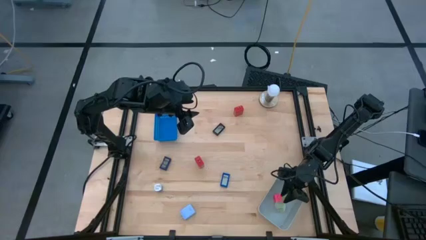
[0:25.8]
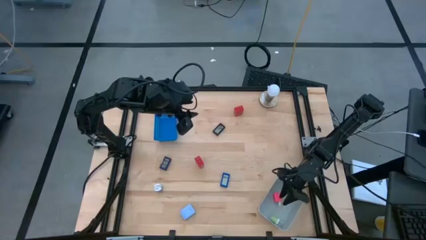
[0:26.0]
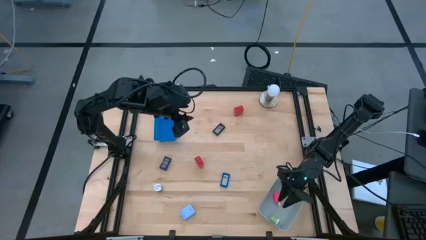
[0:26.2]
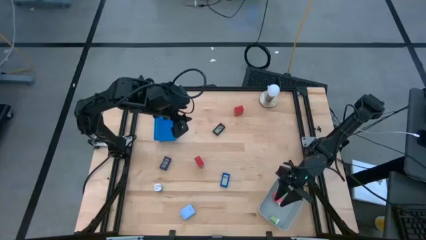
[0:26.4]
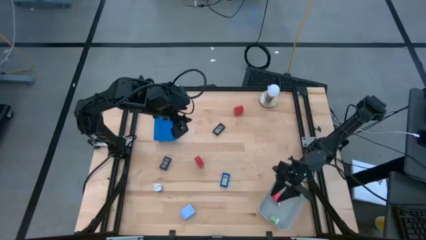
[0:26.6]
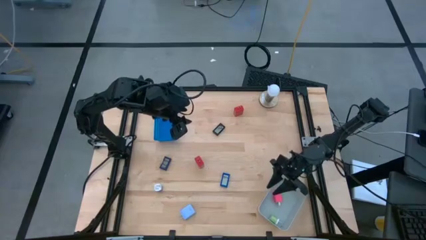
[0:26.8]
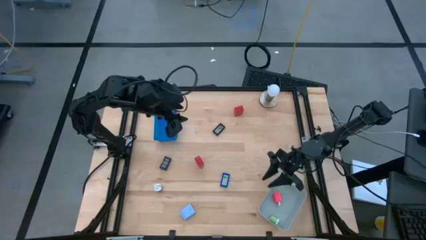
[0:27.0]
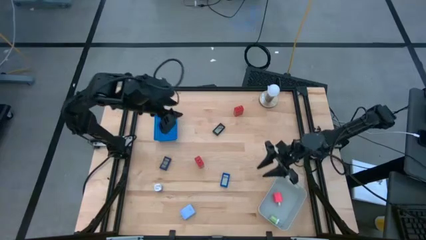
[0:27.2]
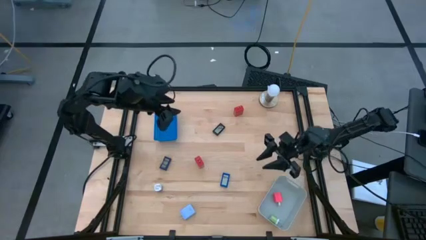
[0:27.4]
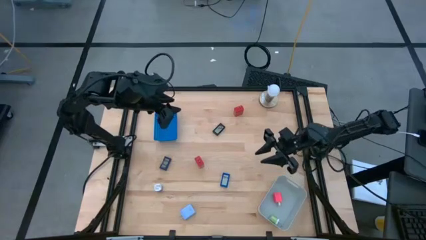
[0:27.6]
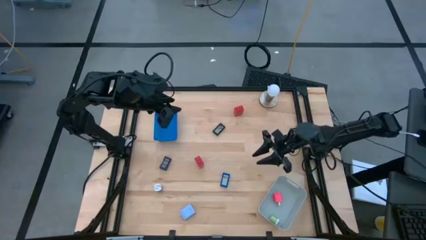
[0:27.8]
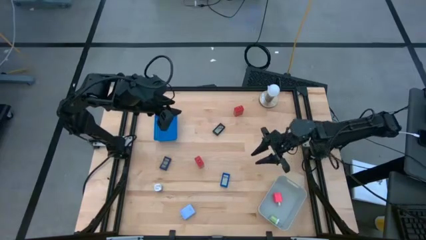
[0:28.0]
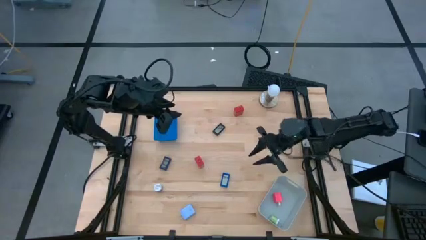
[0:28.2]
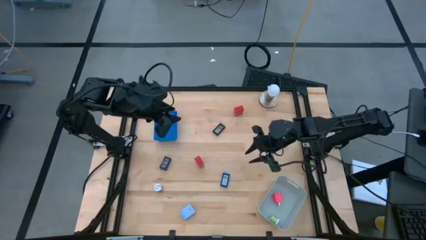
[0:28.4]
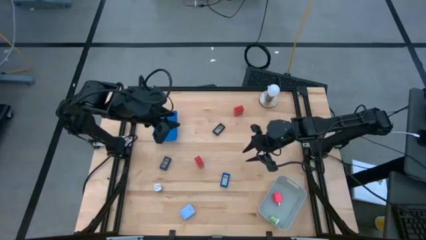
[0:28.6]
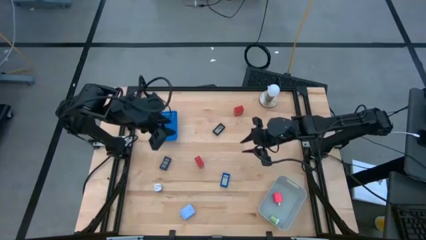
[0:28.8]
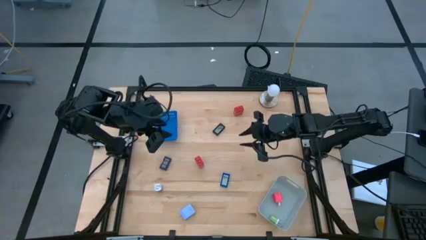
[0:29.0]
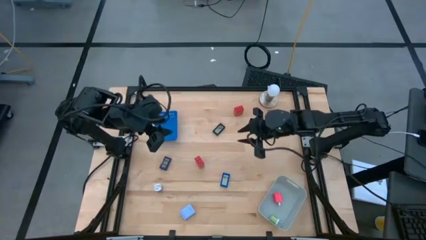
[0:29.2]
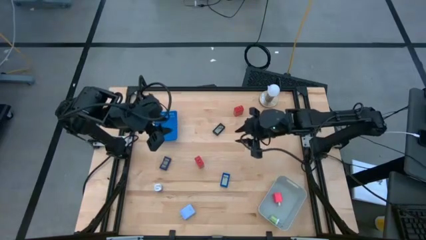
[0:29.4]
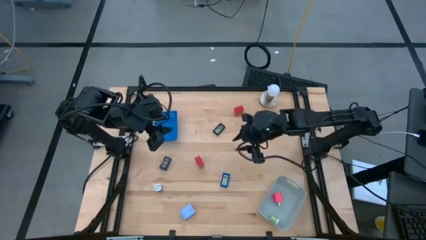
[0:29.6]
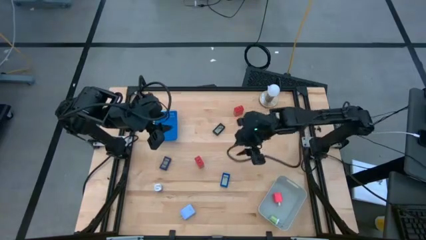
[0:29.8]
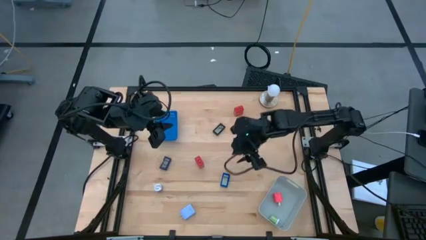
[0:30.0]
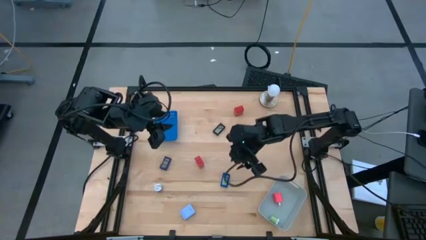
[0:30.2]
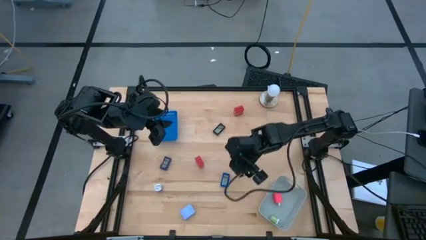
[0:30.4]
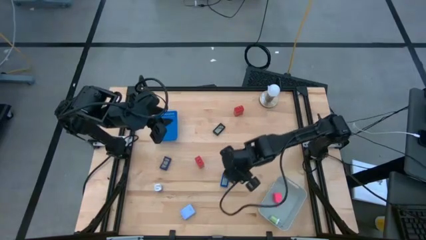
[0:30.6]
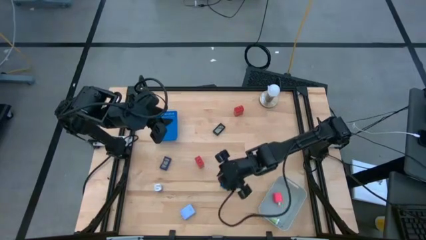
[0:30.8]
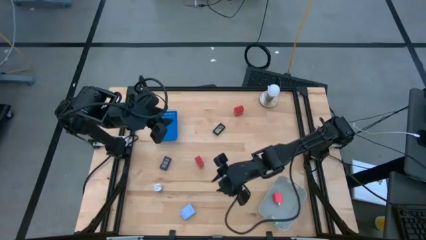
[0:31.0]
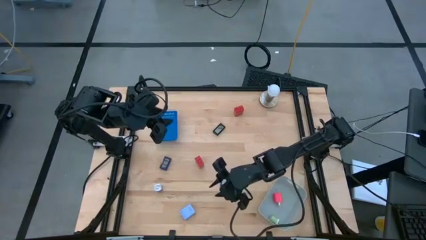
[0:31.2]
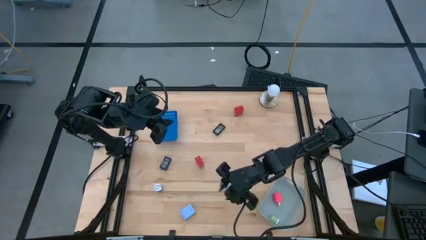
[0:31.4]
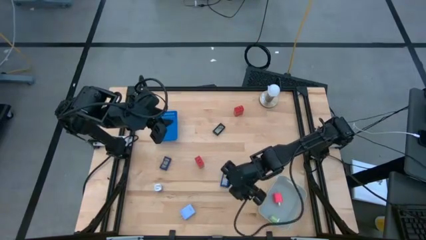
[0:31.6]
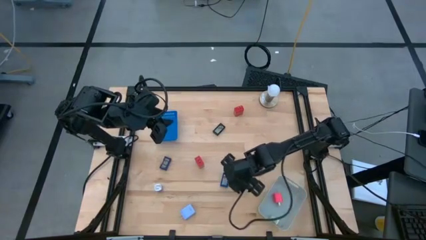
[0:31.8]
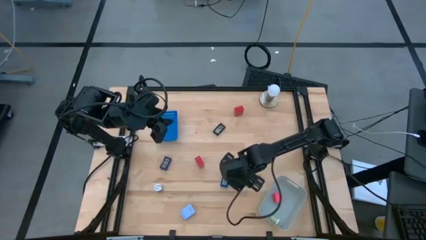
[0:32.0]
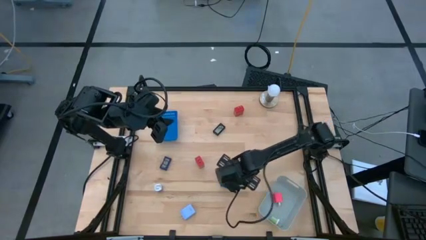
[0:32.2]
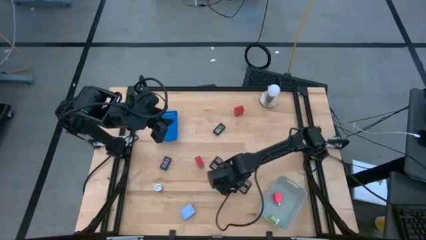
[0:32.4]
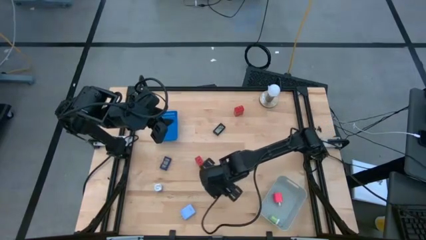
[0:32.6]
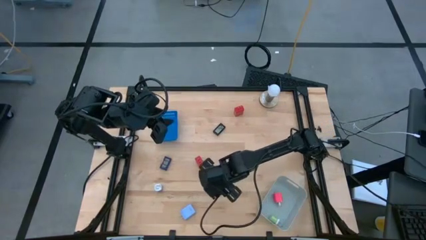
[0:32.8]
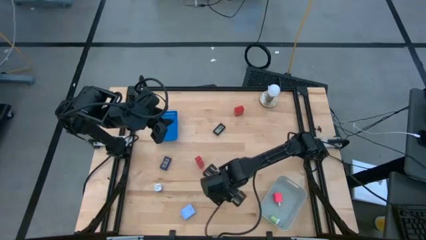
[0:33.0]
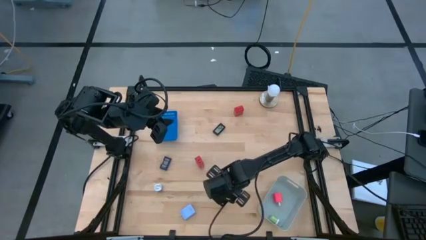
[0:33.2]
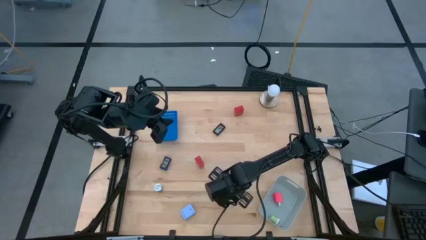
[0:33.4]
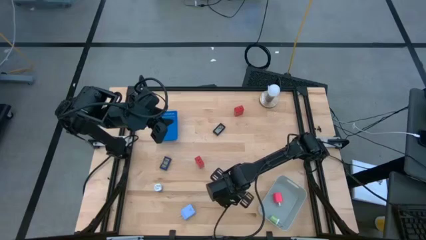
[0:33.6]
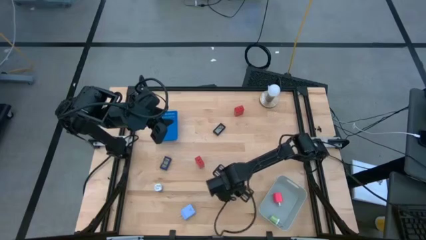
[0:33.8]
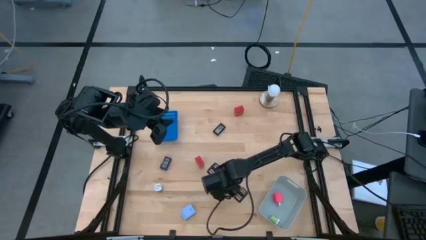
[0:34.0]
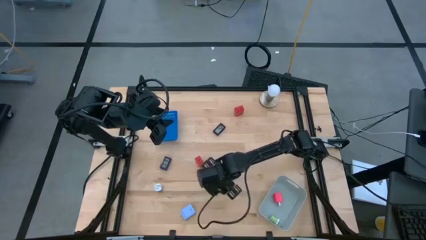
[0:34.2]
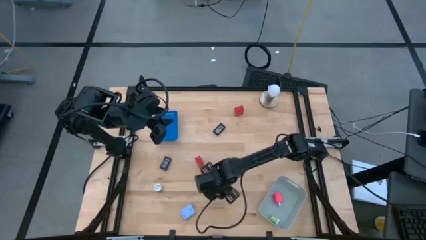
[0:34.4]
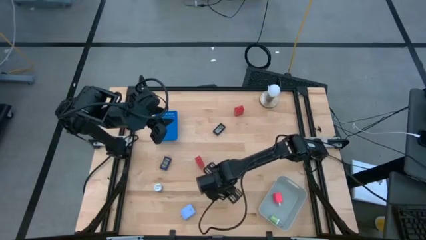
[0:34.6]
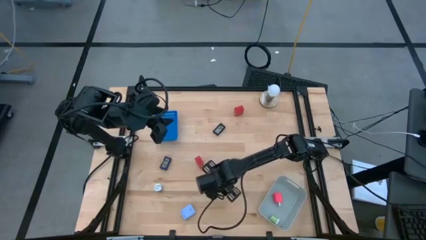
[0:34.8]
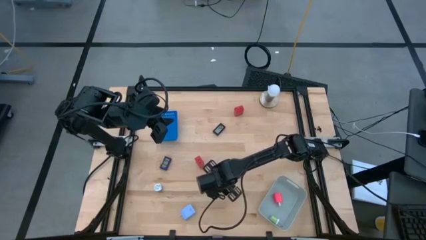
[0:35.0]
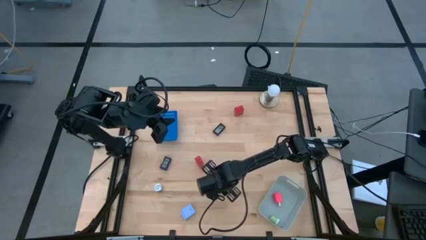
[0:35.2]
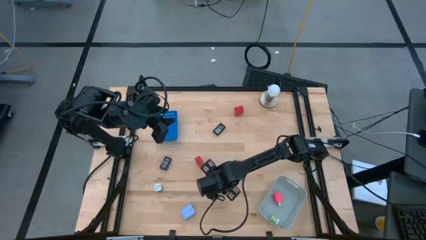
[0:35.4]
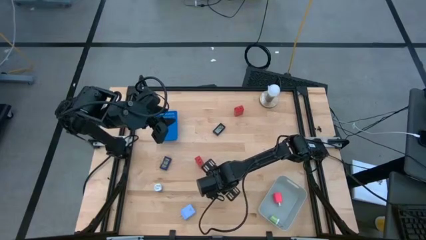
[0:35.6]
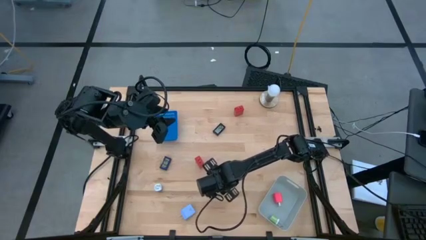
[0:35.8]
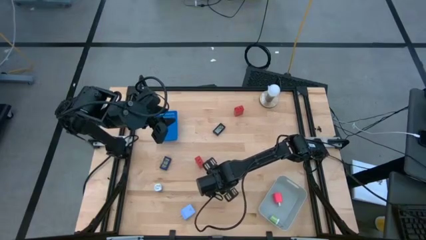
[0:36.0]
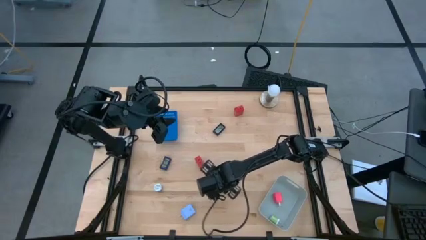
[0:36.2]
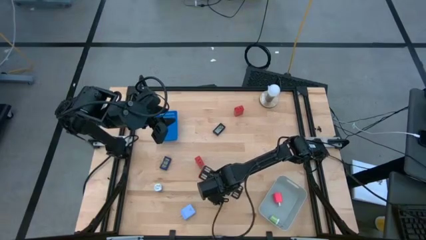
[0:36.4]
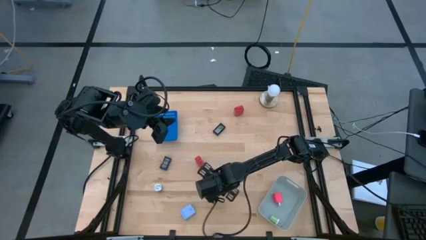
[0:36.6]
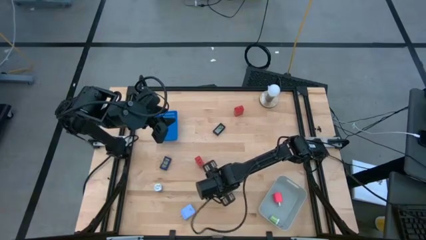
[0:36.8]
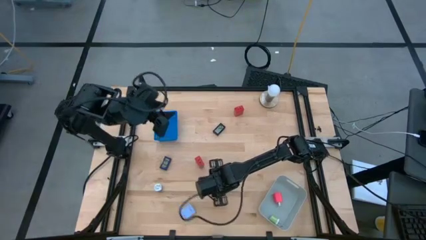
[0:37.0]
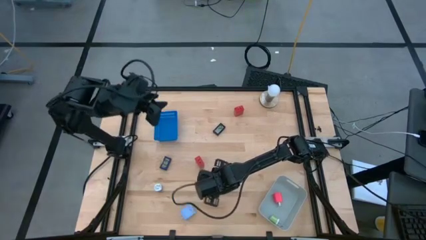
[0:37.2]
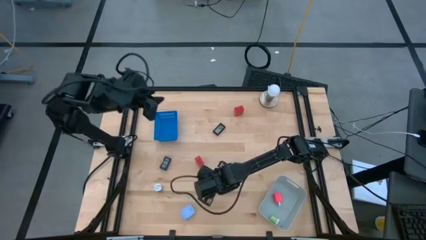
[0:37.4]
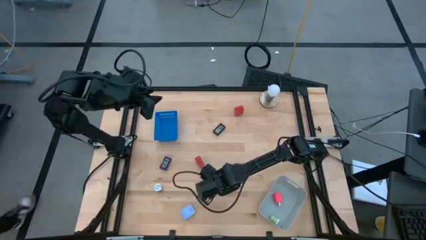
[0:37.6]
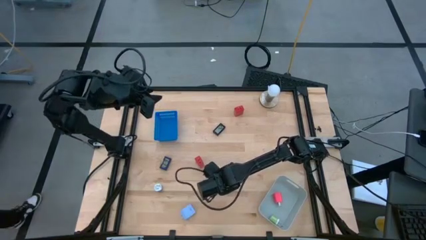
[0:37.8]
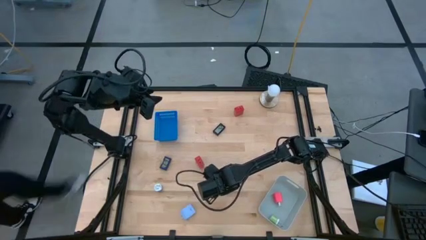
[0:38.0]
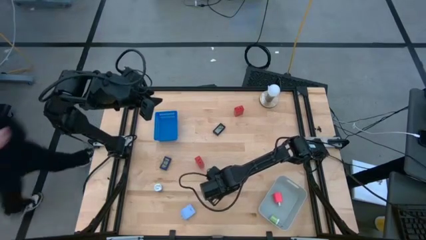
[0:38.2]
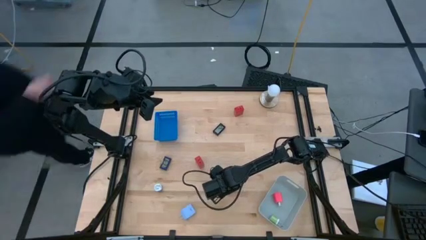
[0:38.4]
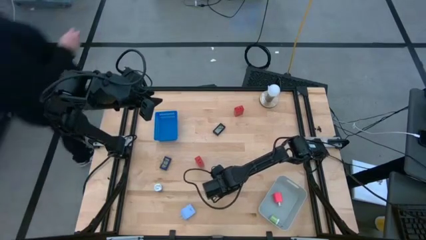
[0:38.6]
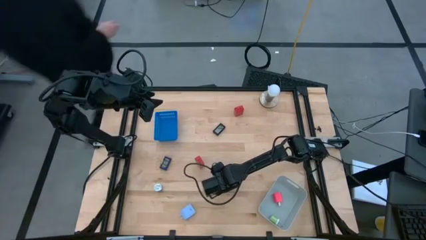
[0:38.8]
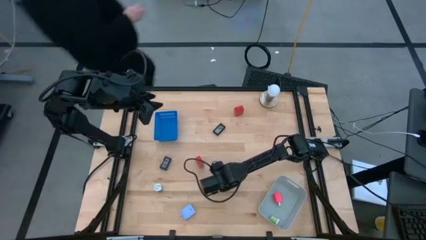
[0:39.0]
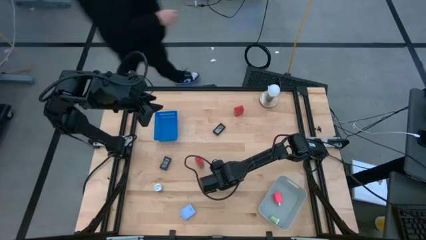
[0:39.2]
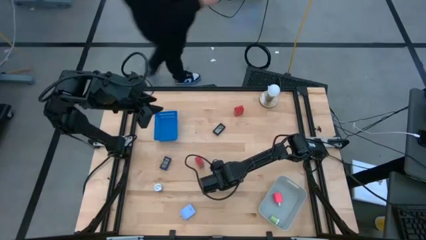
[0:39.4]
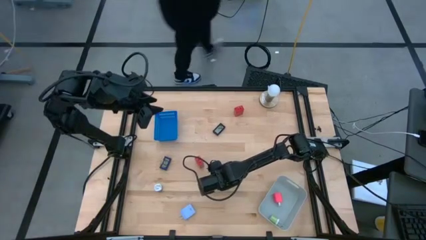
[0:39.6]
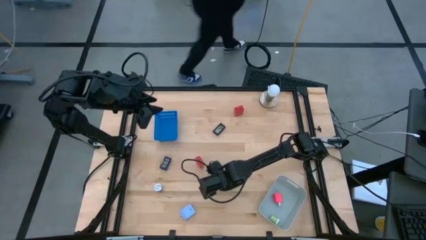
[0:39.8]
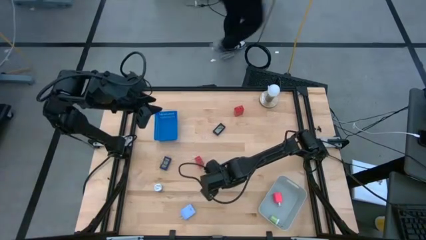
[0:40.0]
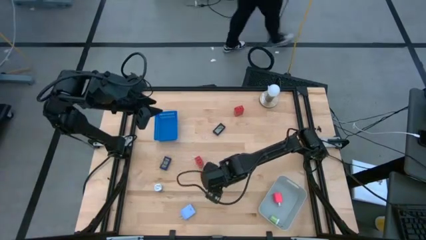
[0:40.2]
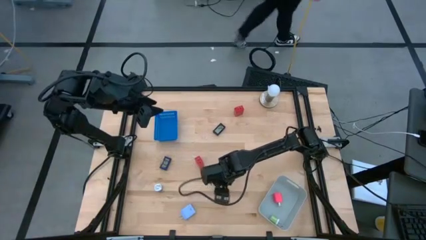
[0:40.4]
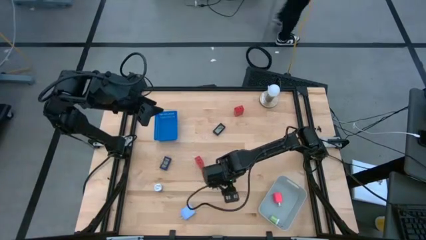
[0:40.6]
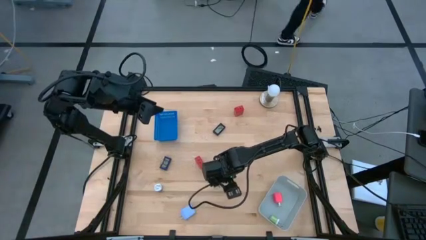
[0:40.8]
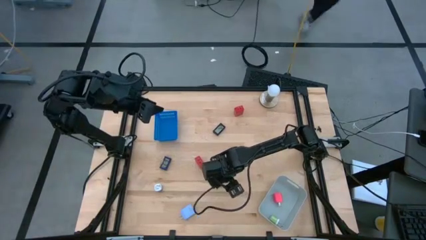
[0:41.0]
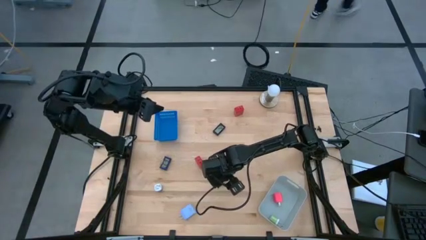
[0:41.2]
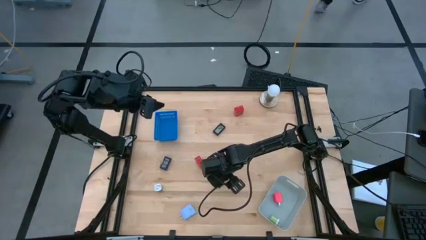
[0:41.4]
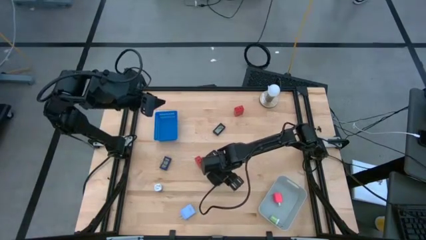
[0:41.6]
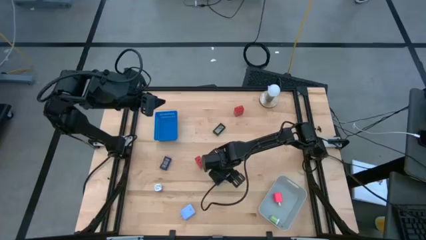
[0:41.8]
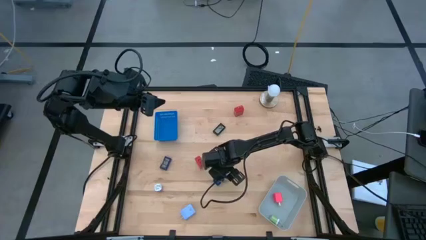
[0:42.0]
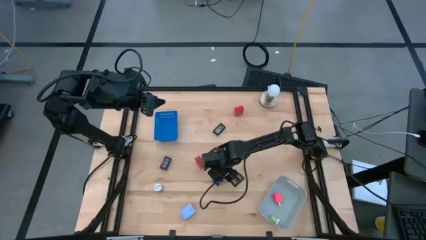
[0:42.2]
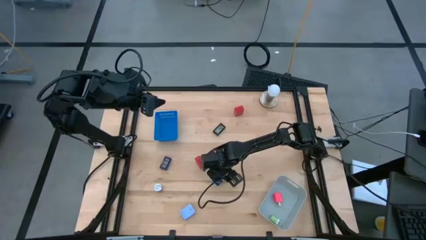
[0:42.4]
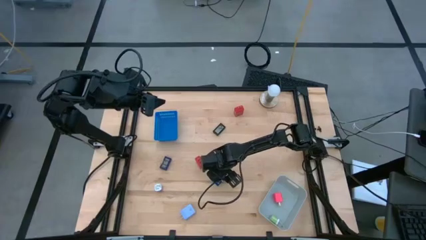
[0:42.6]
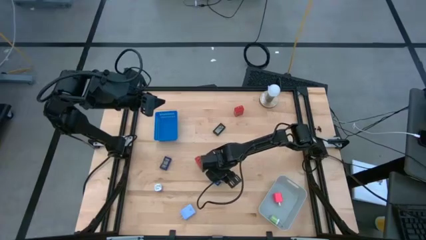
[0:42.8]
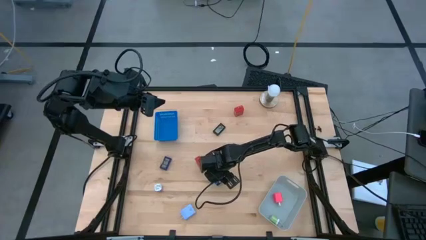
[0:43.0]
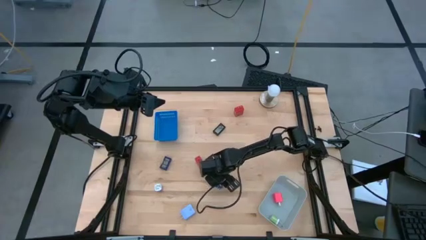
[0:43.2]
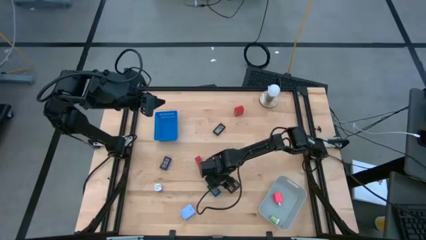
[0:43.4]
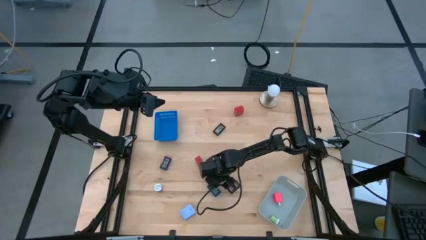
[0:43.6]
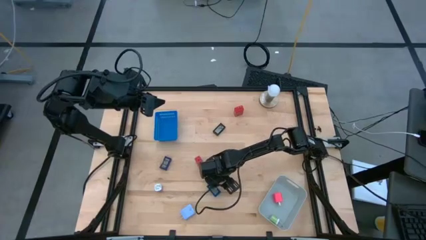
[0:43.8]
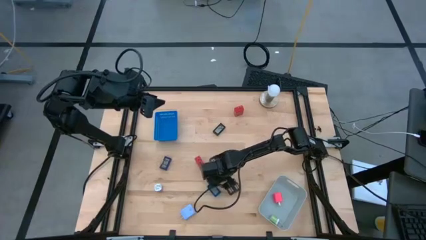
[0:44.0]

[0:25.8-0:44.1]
Task: Pick & Place Office items
Put the blue digital timer into the blue bin
